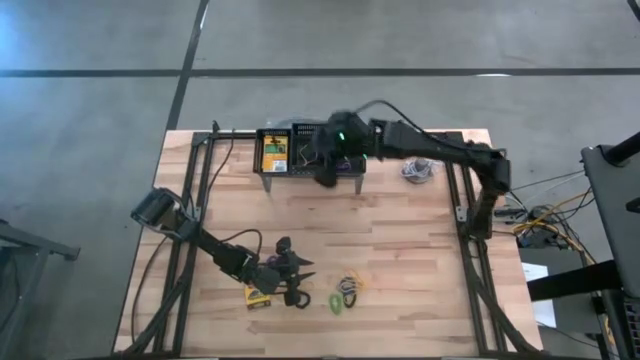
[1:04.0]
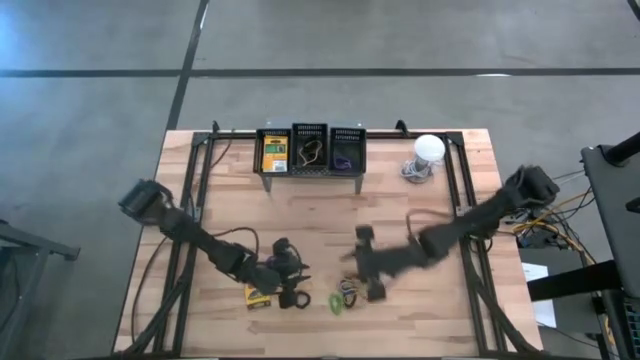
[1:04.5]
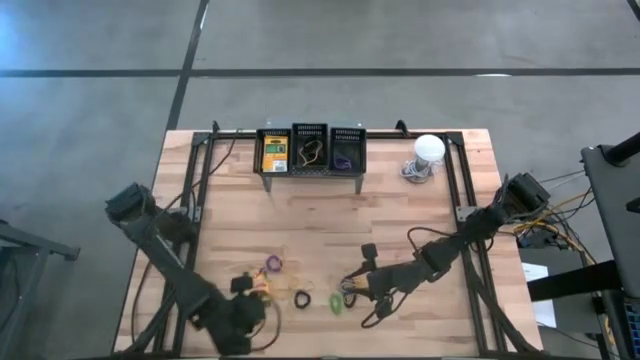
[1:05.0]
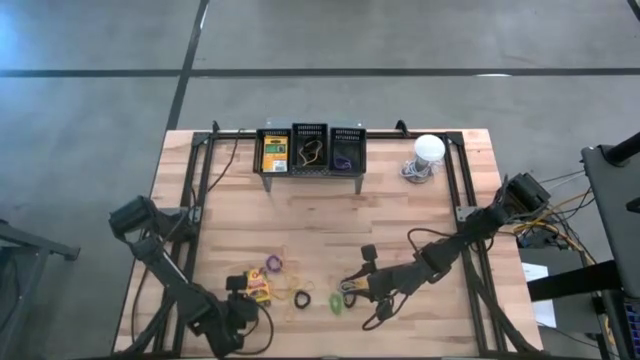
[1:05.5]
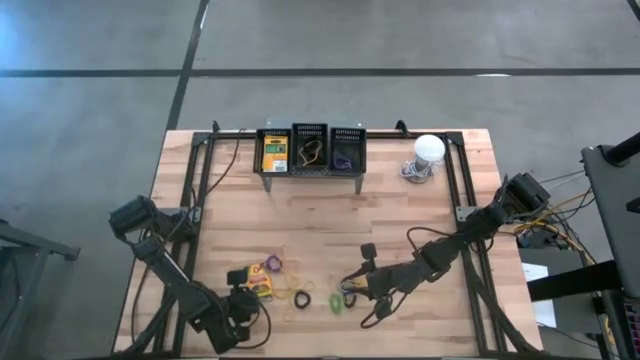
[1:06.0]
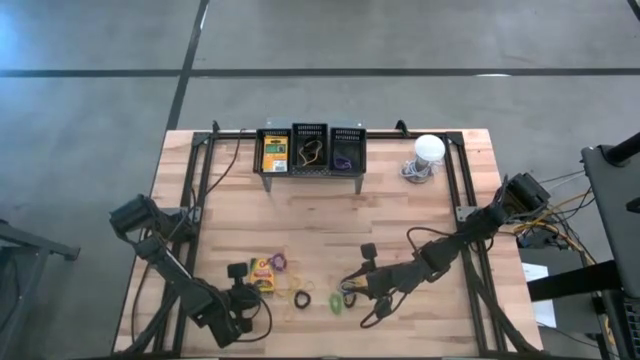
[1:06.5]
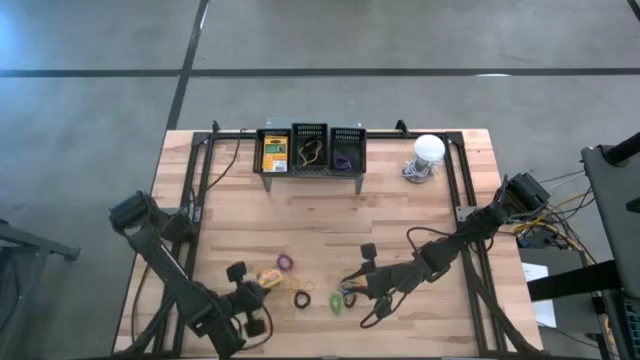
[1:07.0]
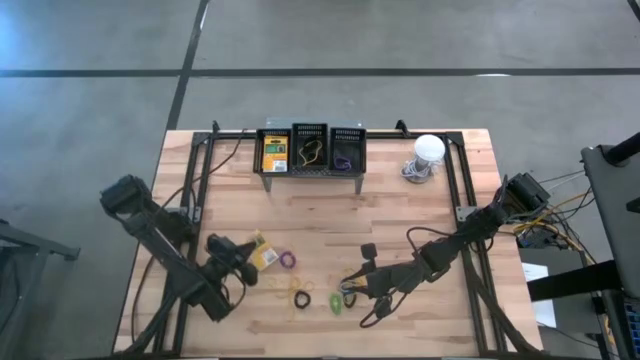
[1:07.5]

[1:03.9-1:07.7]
Task: Pick & Place Office Desk Supplies
Put the yellow crayon box into the left black basket

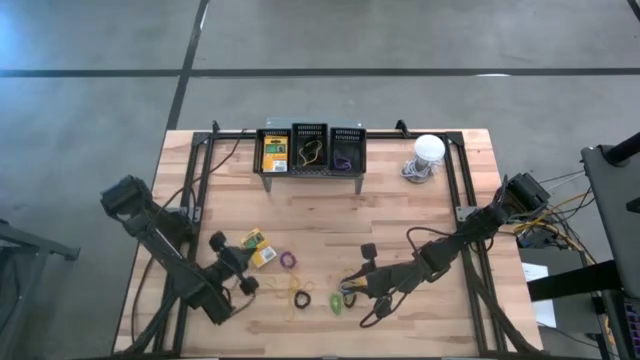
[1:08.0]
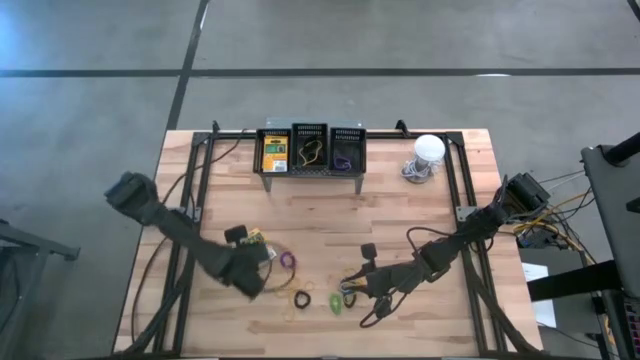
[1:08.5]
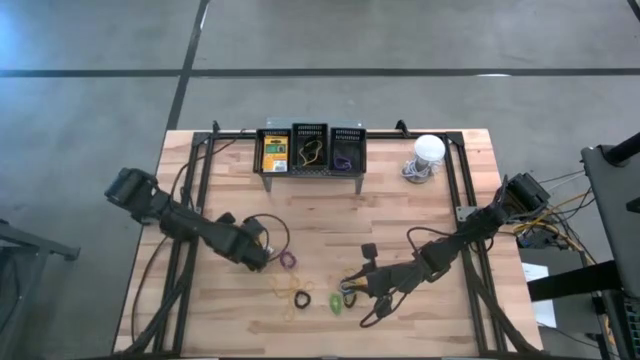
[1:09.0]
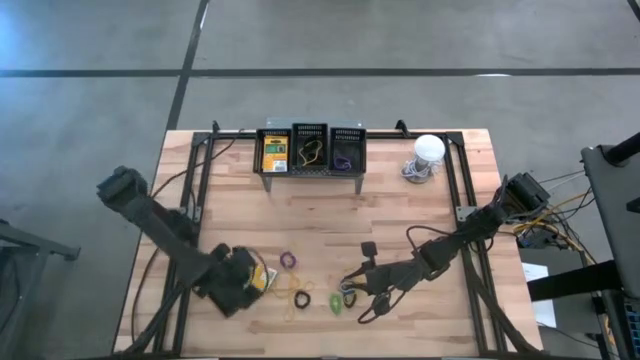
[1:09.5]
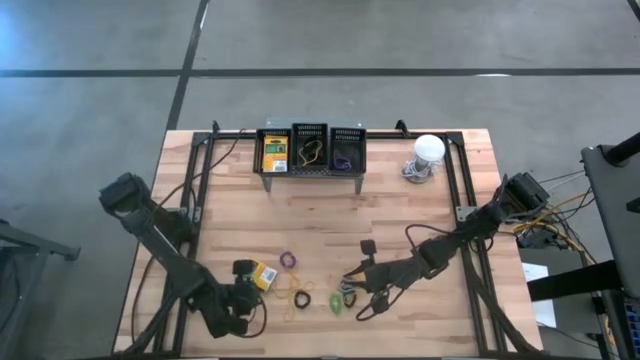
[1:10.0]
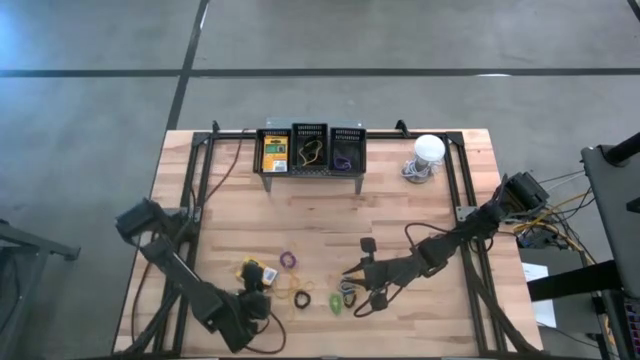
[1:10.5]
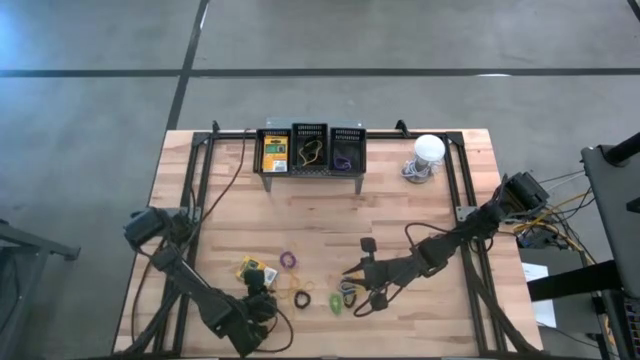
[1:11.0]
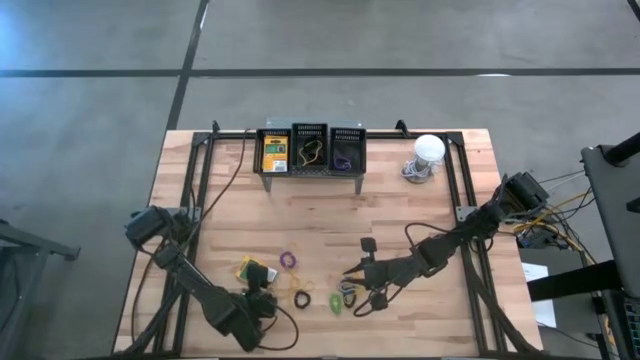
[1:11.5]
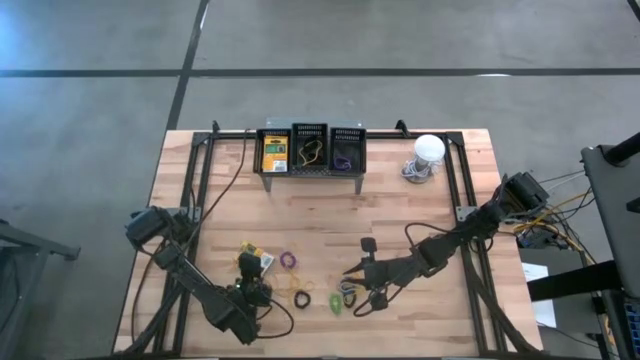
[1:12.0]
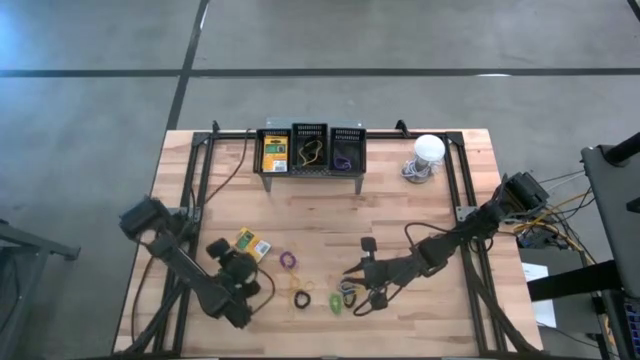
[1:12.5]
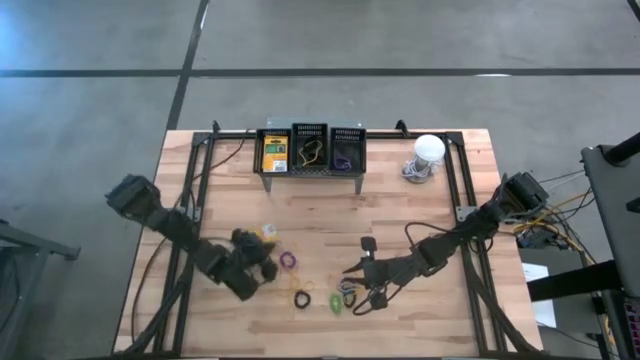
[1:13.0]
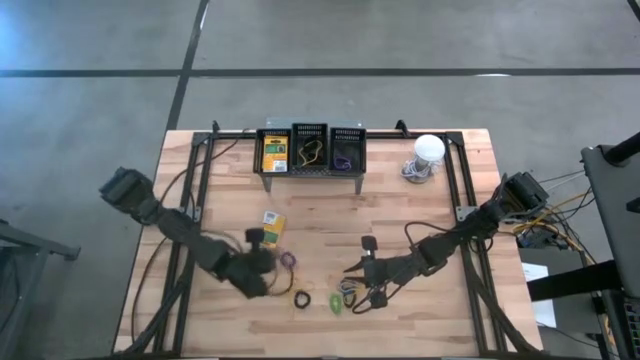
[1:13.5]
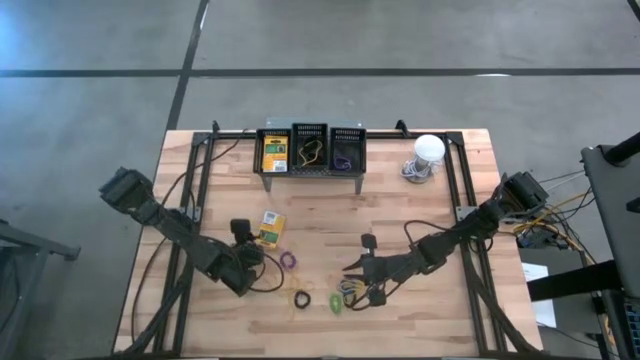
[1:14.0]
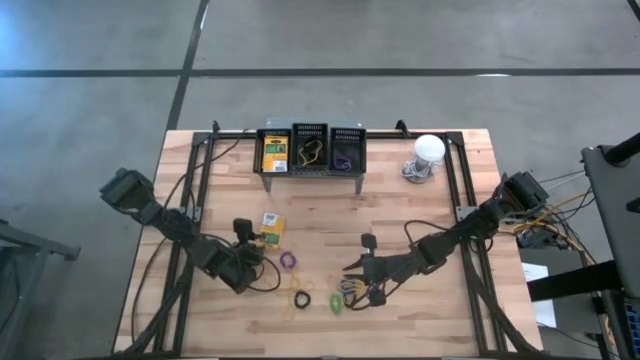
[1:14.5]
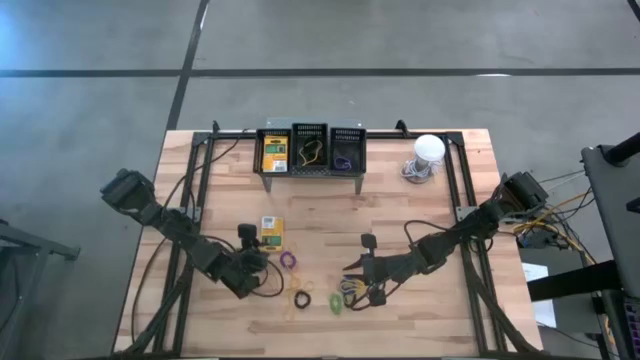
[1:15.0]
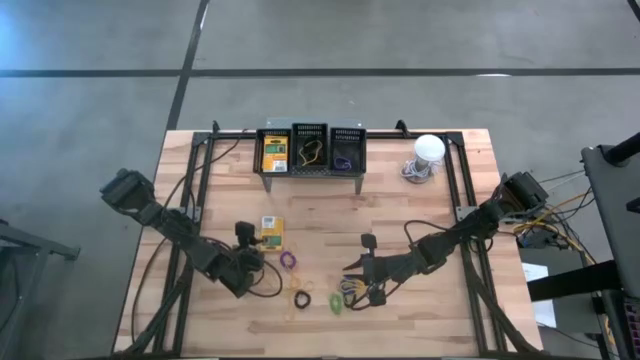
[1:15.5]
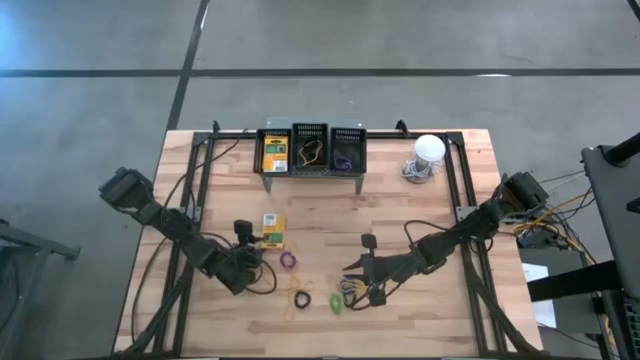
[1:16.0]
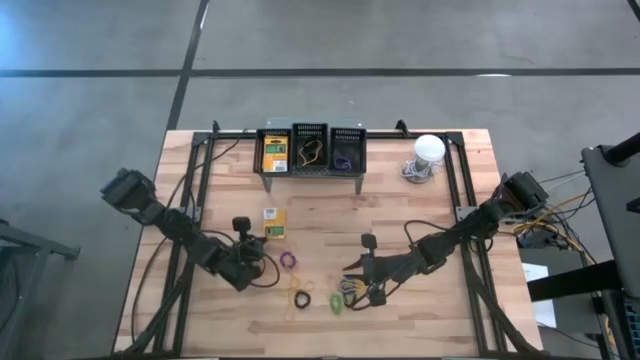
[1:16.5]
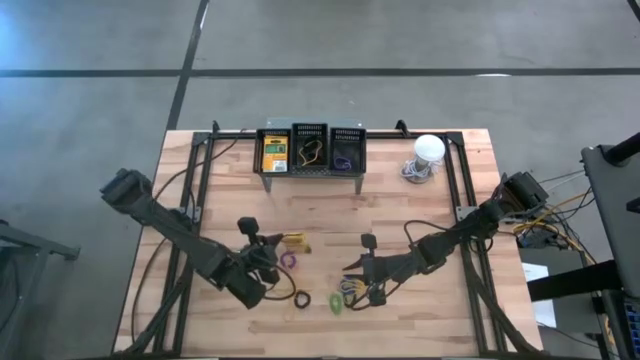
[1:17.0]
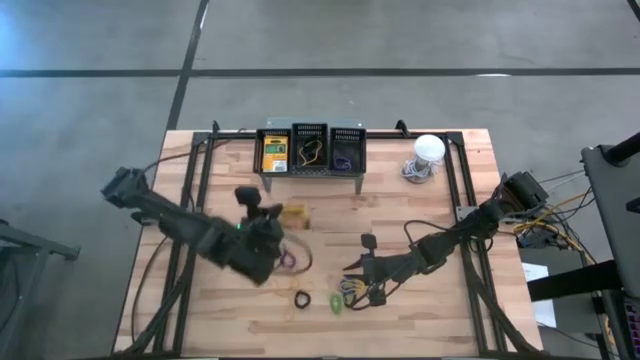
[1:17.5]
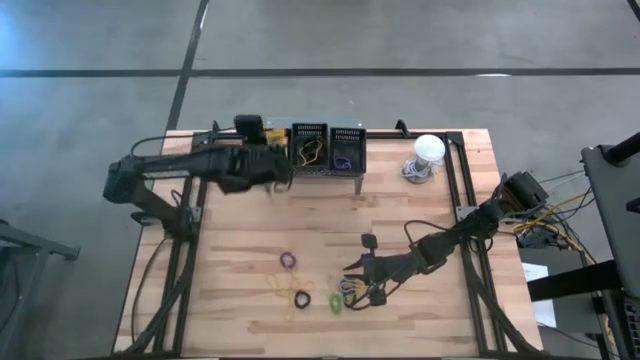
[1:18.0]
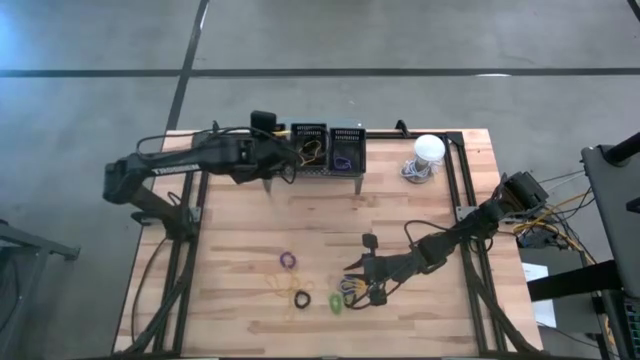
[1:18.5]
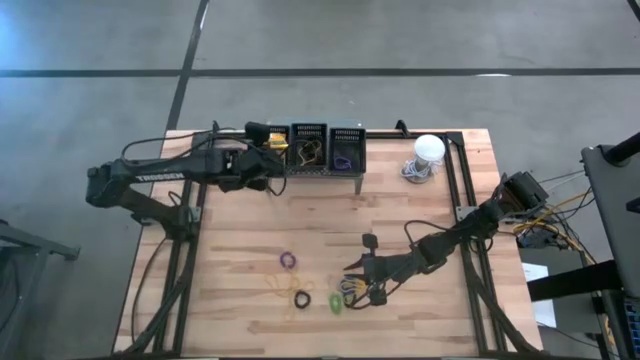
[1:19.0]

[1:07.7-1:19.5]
Put the yellow crayon box into the left black basket

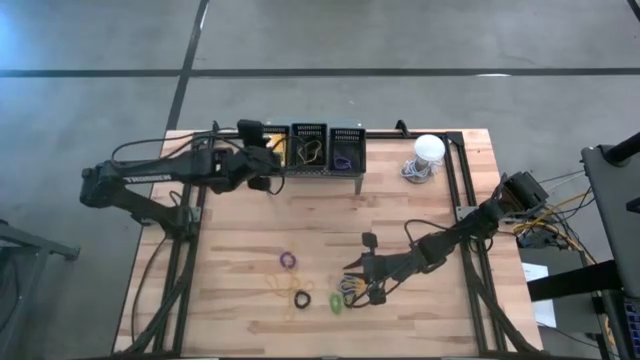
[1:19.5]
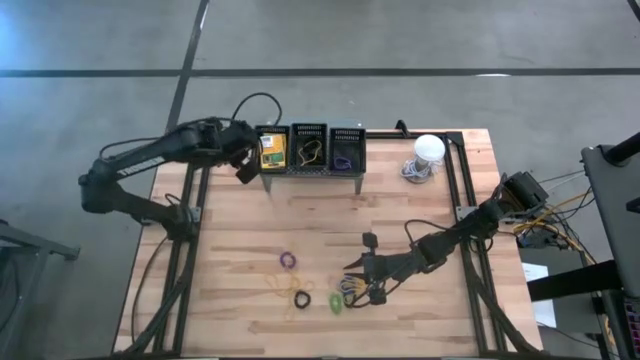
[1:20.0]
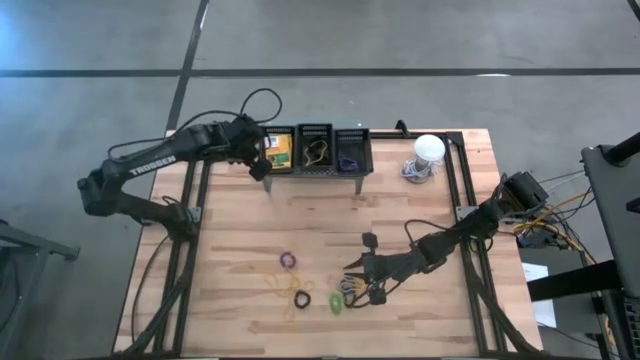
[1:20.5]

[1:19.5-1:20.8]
Adjust the left black basket on the shelf

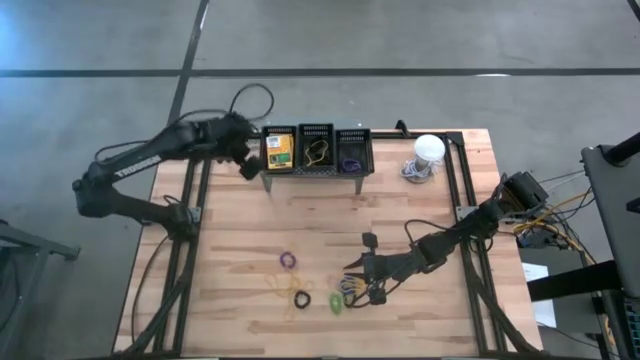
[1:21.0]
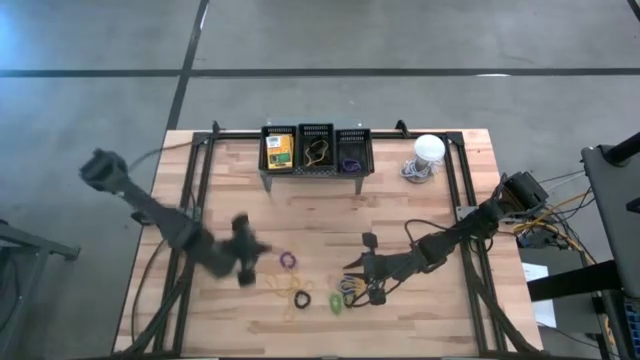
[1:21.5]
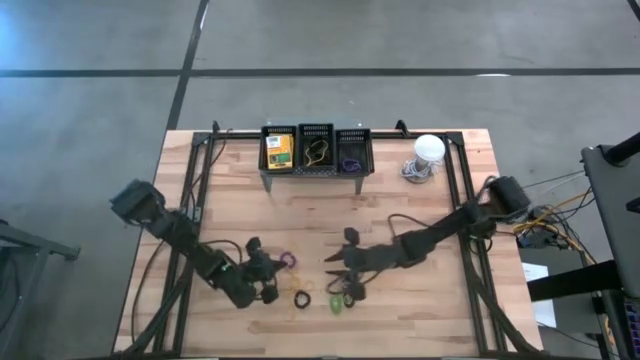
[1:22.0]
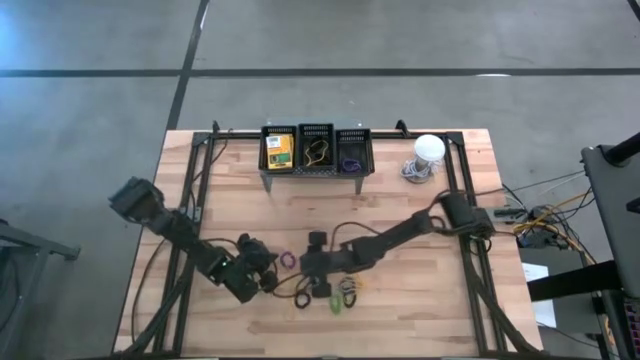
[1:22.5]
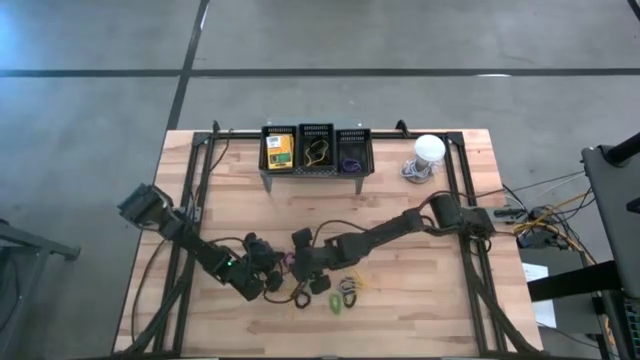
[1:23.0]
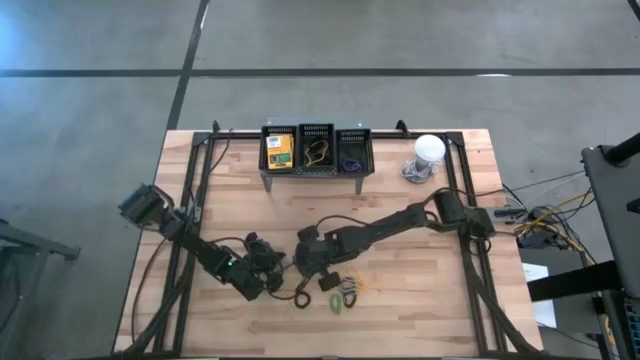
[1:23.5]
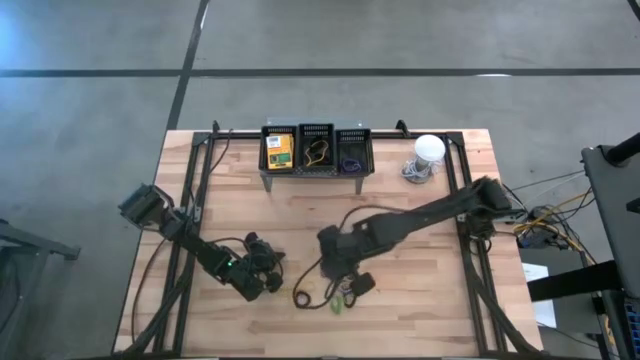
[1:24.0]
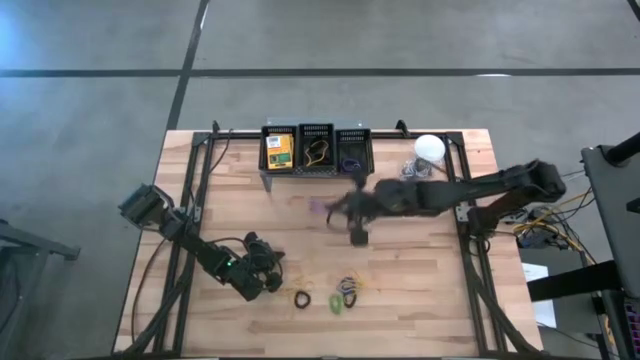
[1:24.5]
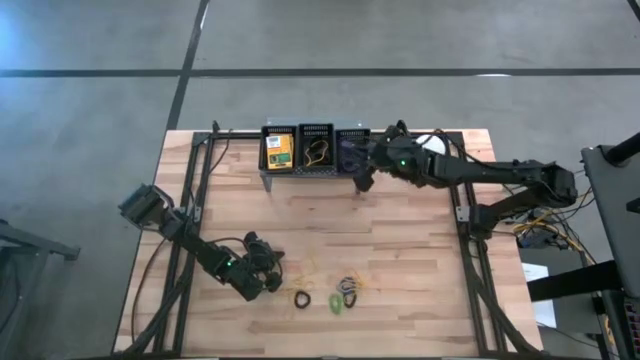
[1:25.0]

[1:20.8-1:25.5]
Put the purple spring keychain into the right black basket

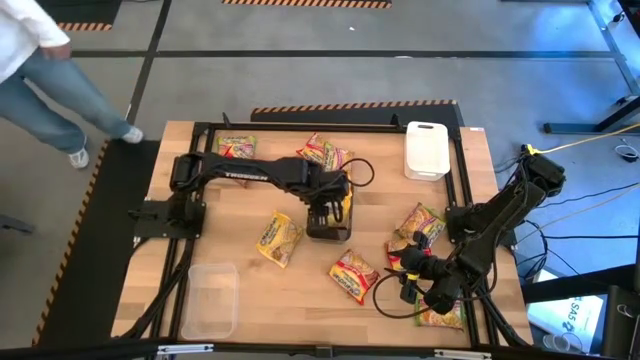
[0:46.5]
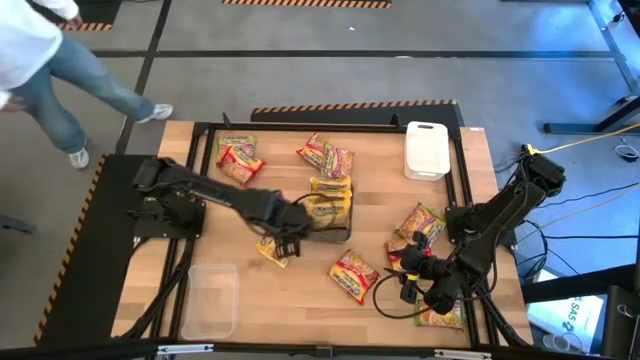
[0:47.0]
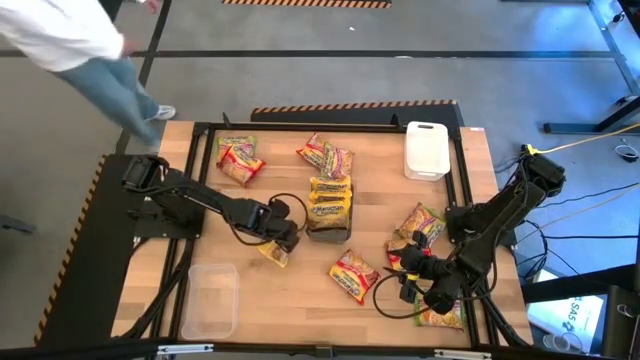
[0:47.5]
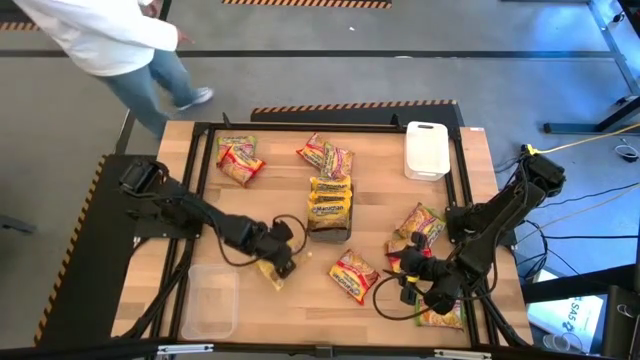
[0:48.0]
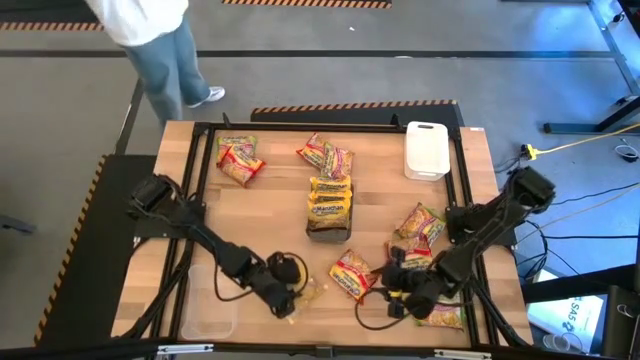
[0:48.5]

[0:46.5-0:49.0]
Task: Sort Maruchan noodles
Move the yellow noodle pack to the bottom
